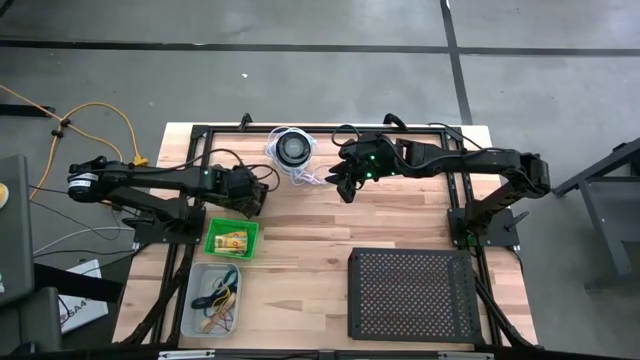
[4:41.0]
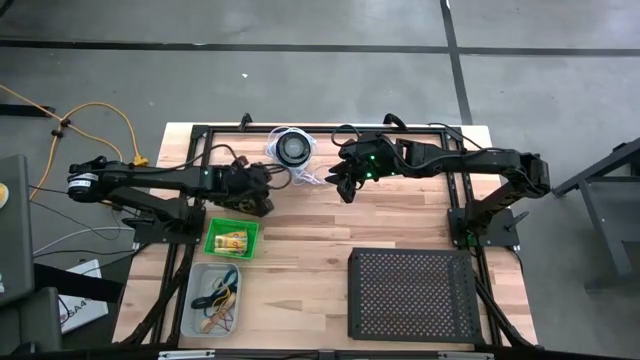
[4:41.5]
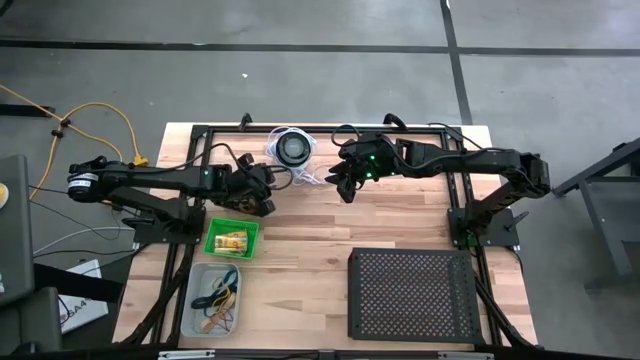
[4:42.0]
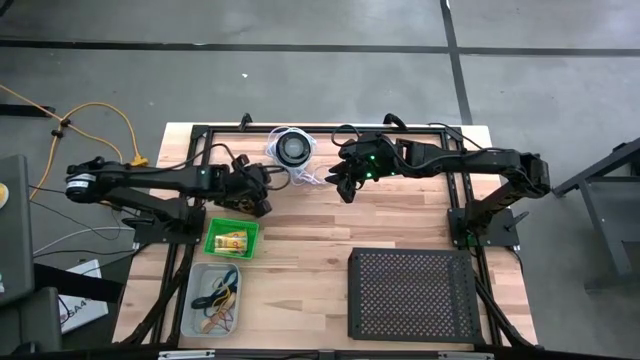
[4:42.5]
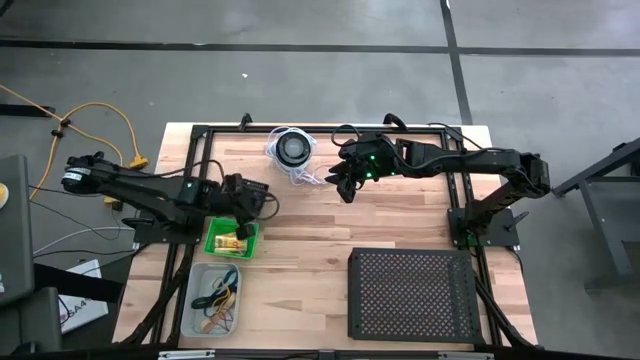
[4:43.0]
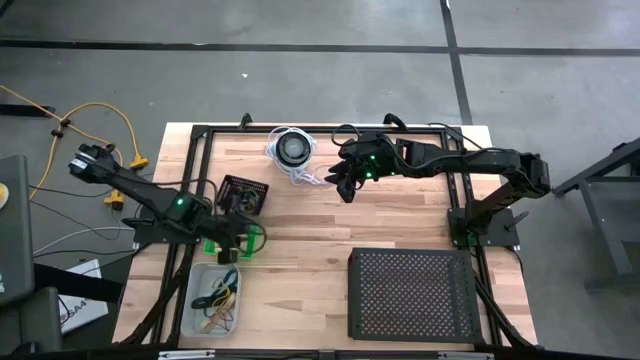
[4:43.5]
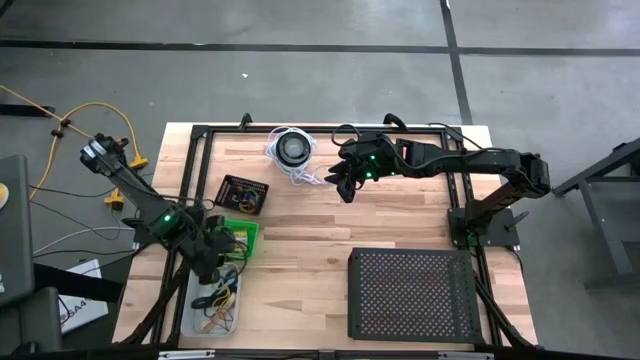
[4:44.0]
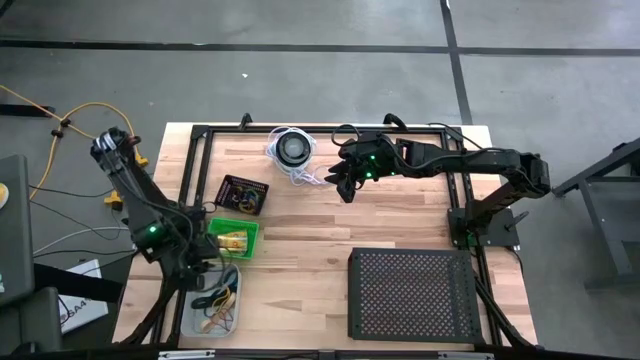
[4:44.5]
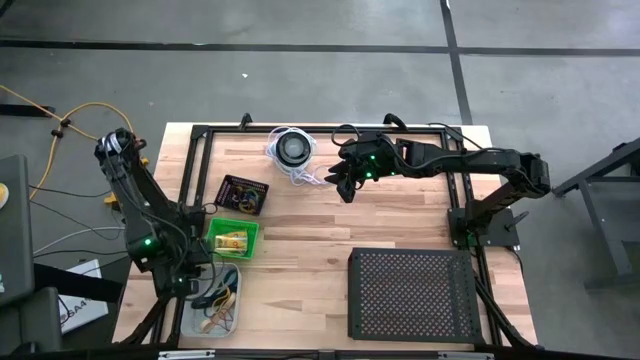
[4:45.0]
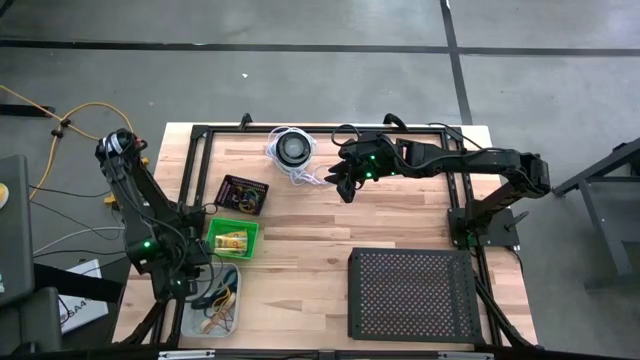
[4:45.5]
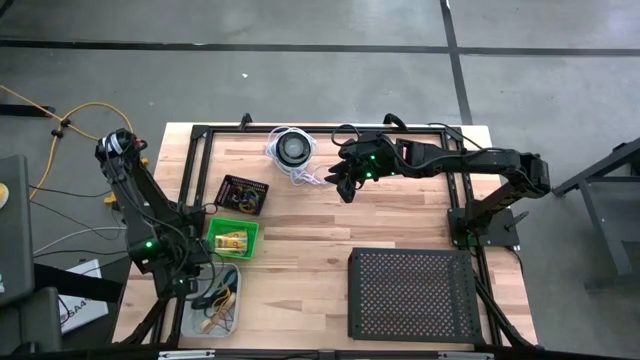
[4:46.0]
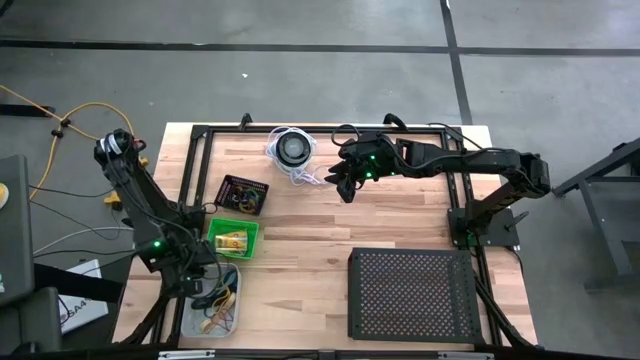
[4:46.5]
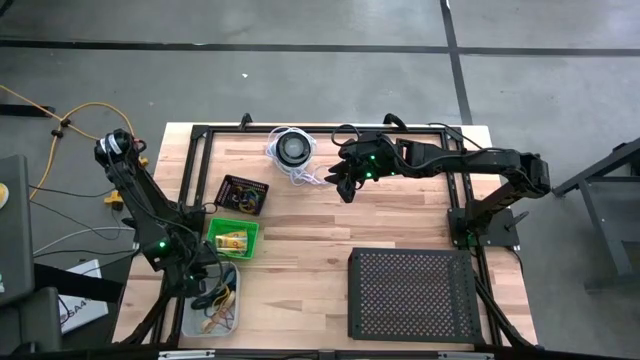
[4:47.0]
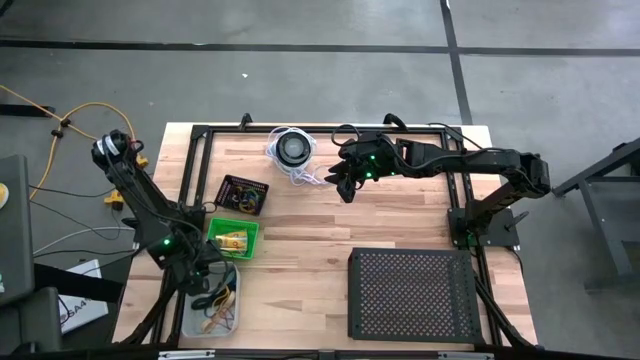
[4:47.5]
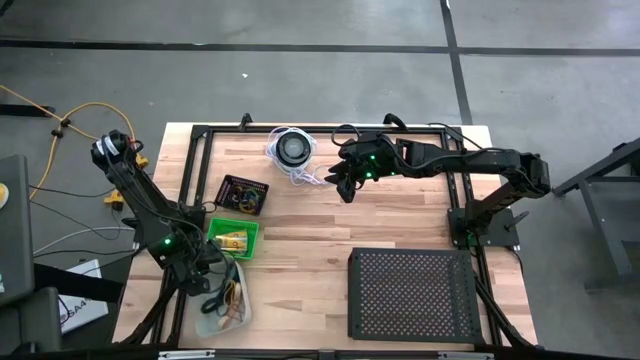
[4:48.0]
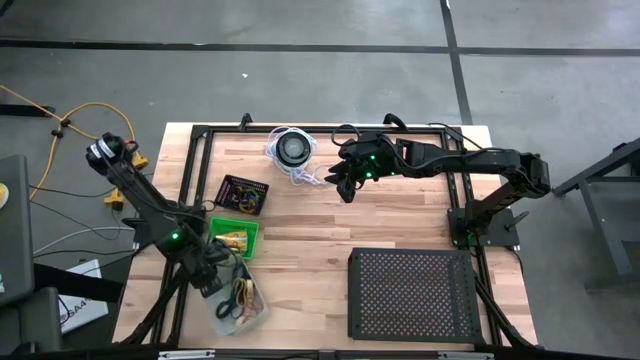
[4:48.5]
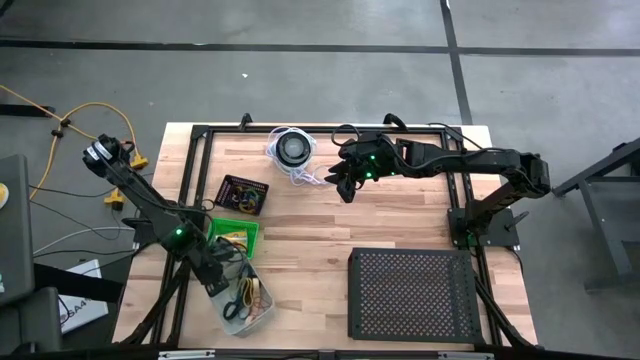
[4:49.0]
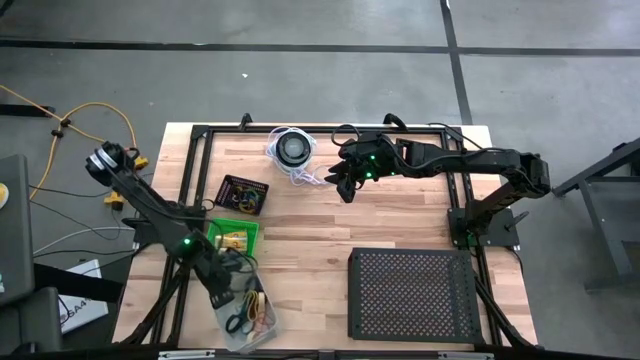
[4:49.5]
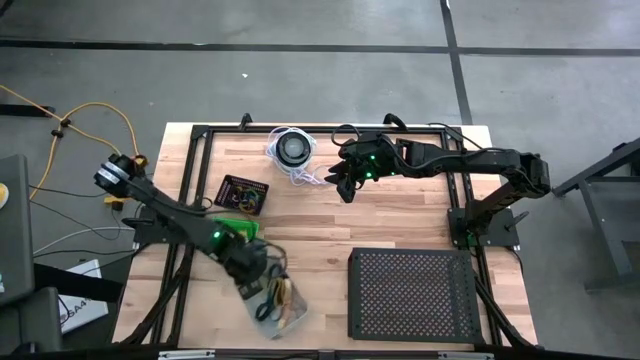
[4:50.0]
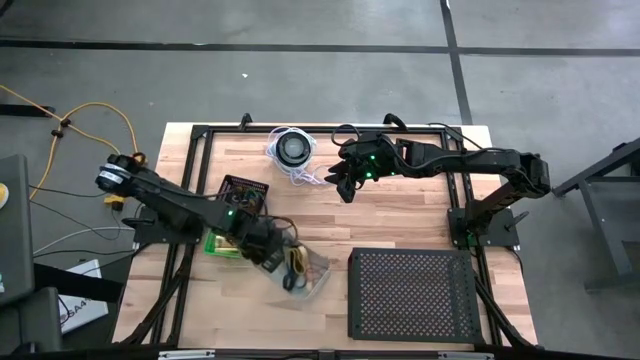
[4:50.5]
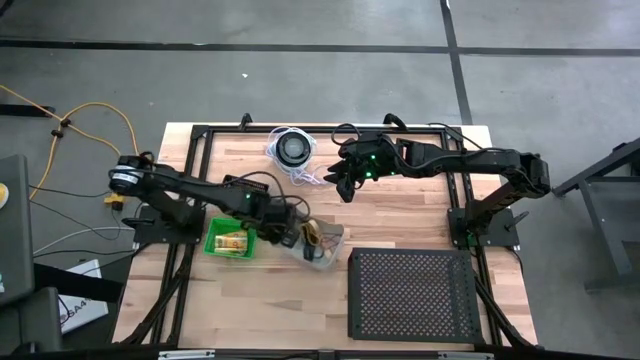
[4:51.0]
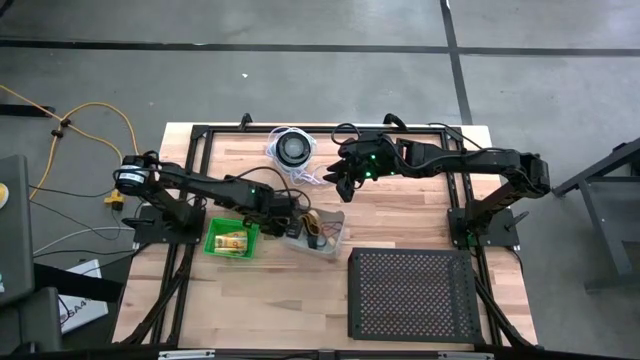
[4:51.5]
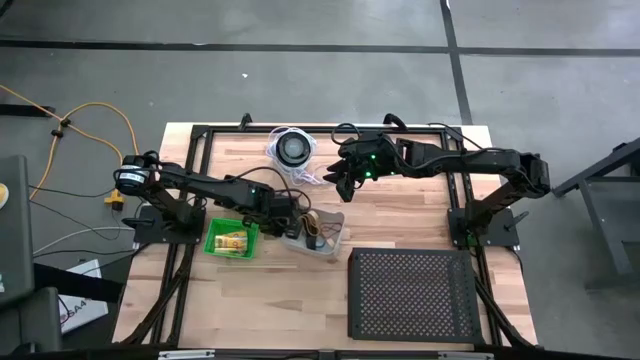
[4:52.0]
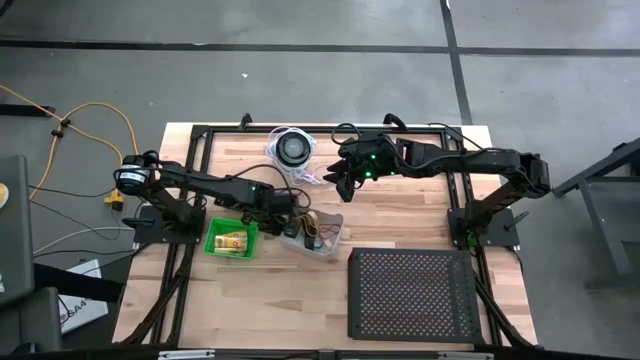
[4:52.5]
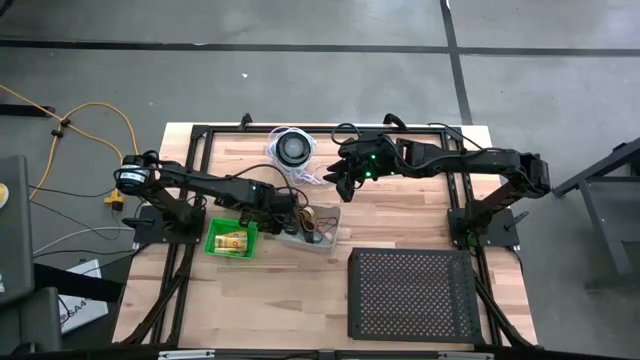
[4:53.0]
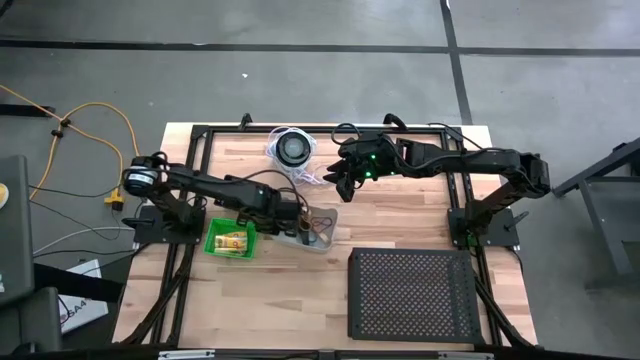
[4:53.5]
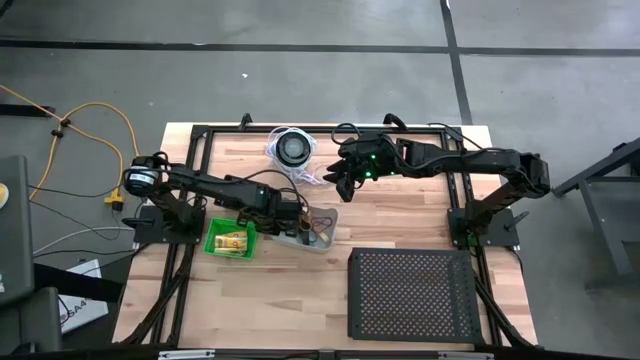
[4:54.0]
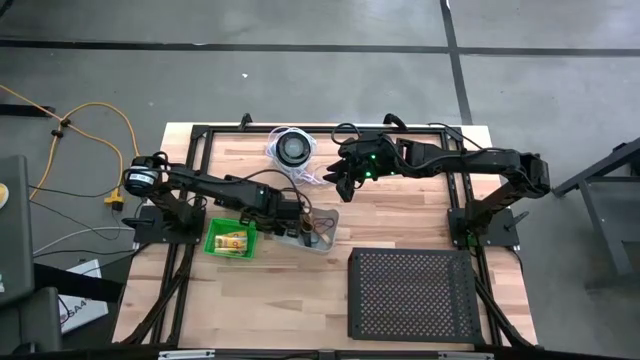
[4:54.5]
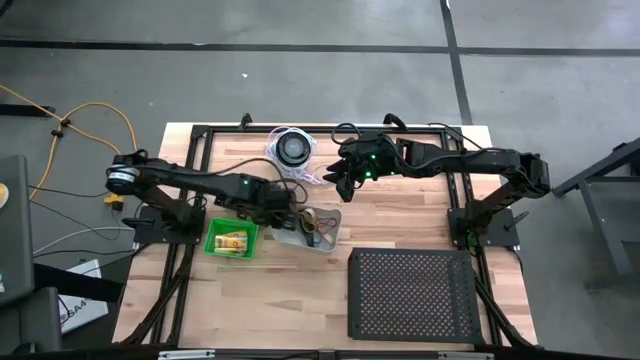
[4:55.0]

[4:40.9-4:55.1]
Task: Pick & Place Office Desk Supplies
Move the gray bin to the center of the table

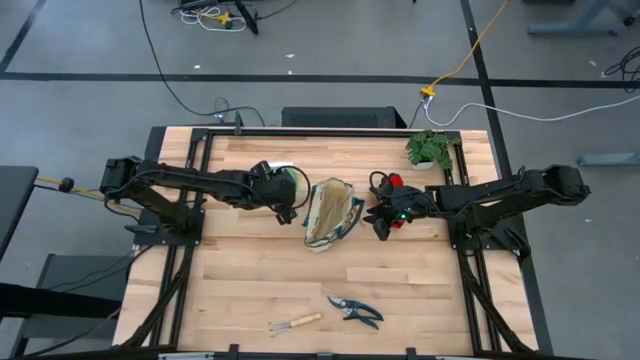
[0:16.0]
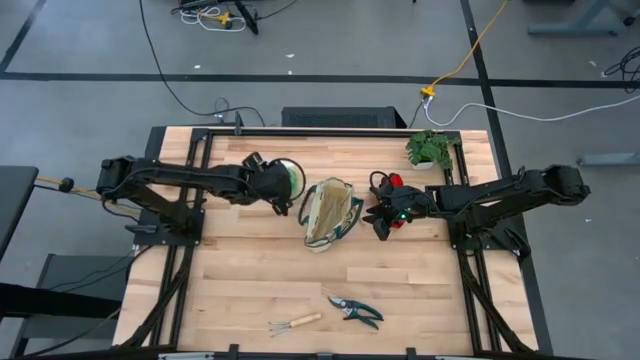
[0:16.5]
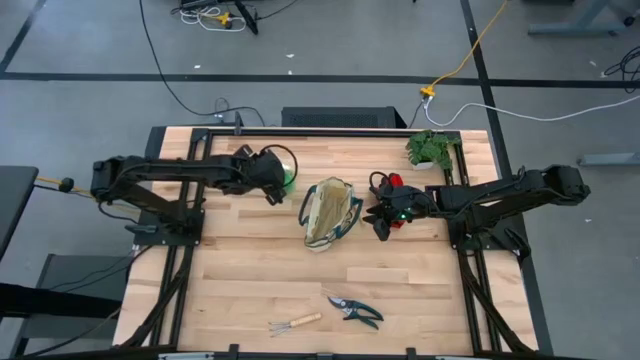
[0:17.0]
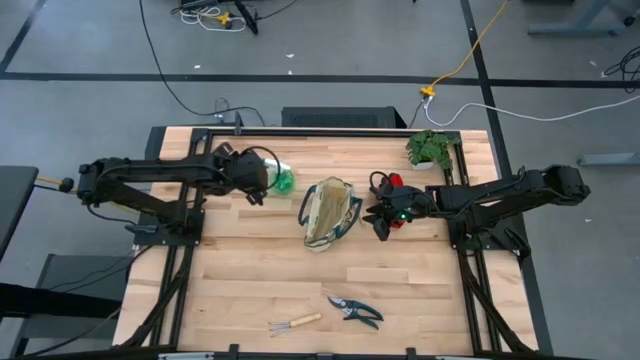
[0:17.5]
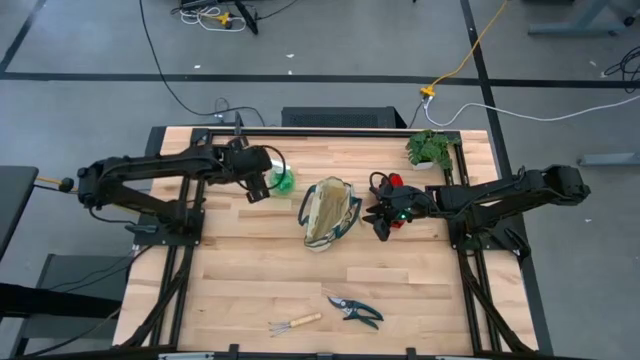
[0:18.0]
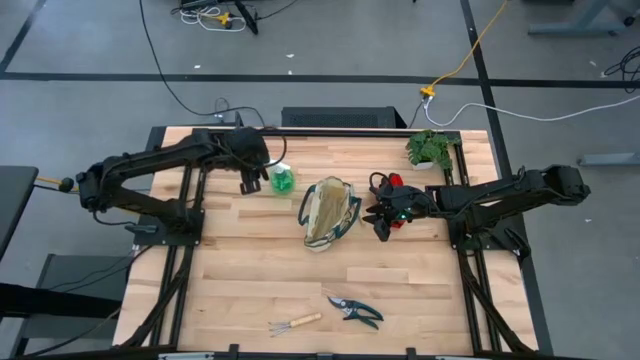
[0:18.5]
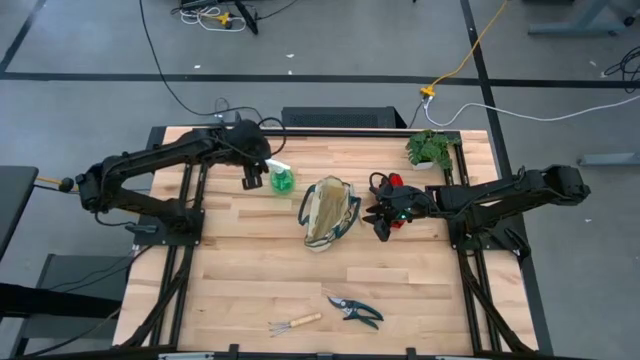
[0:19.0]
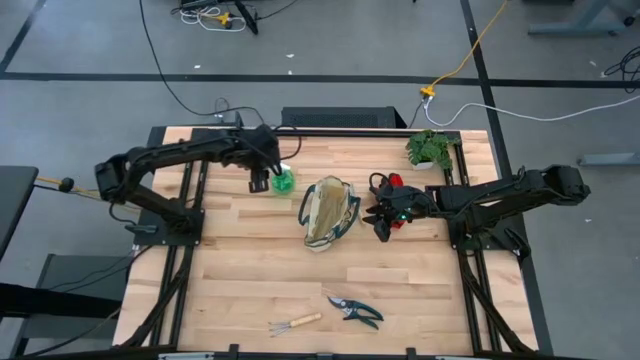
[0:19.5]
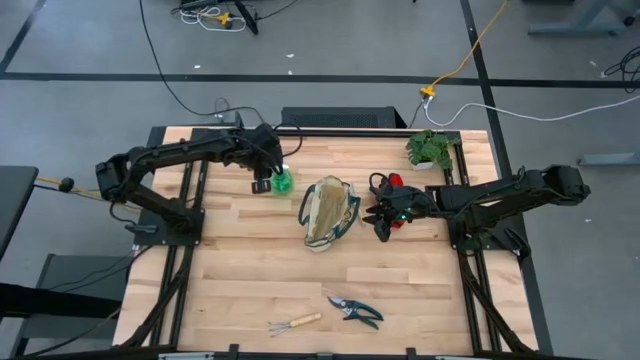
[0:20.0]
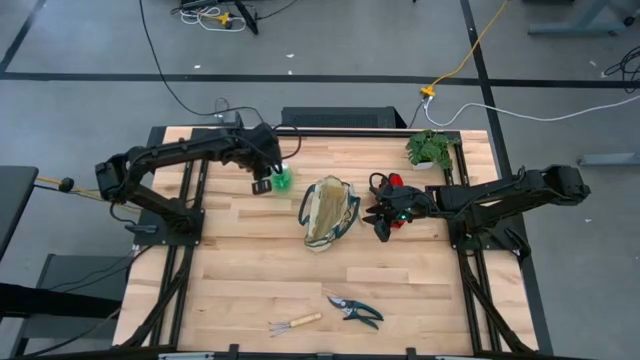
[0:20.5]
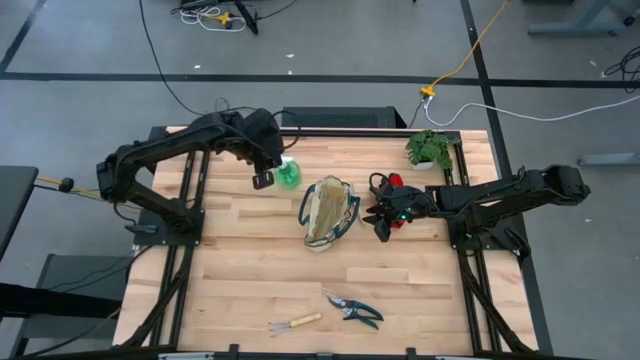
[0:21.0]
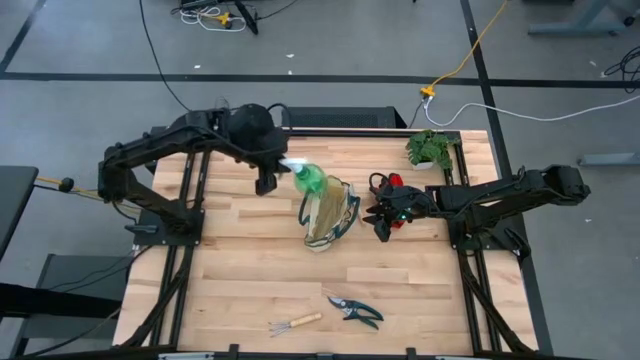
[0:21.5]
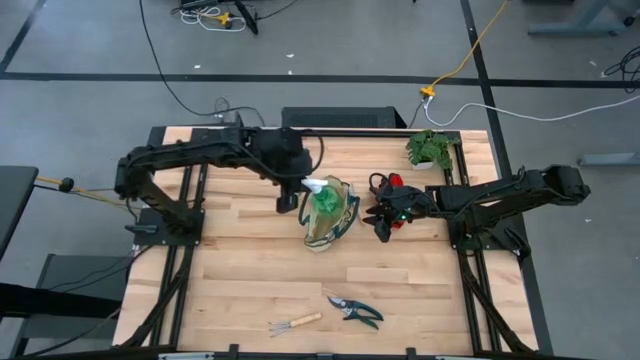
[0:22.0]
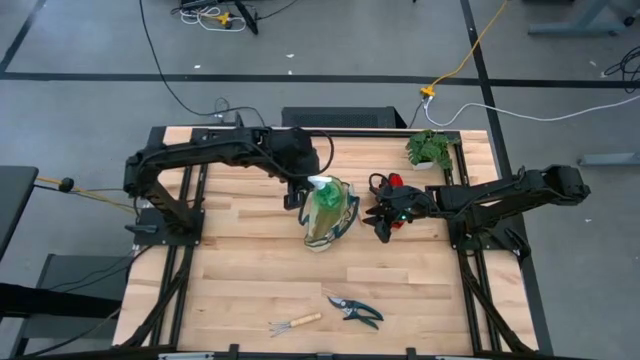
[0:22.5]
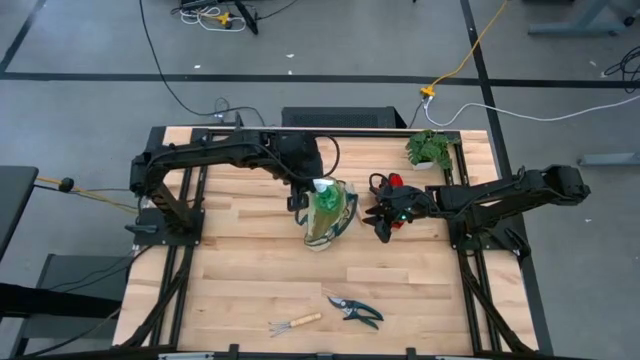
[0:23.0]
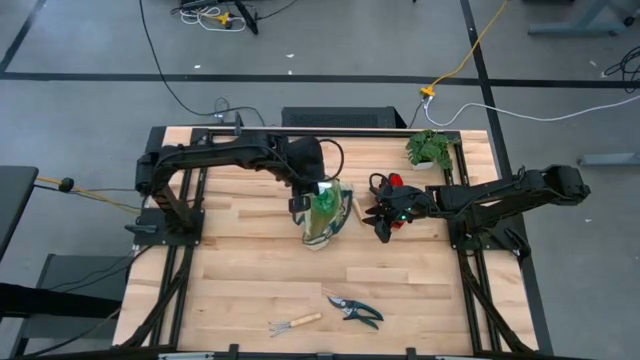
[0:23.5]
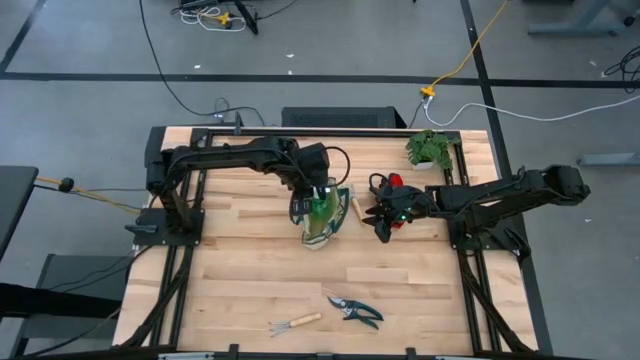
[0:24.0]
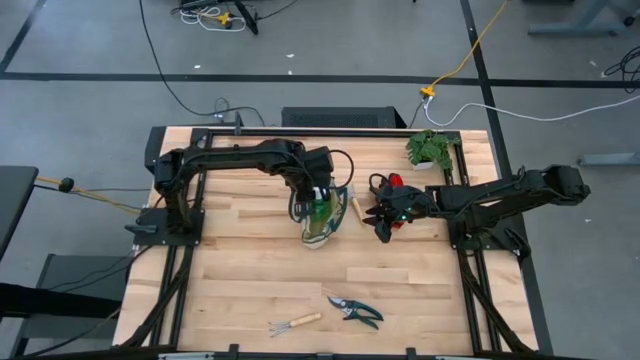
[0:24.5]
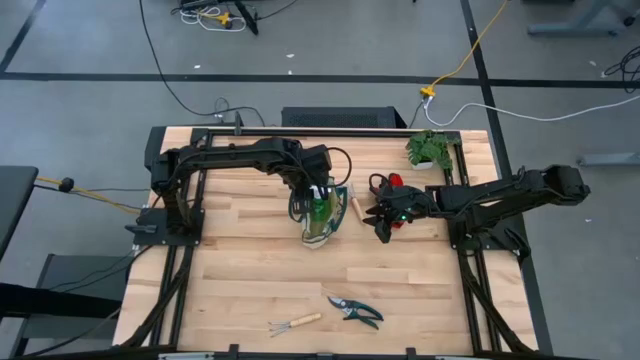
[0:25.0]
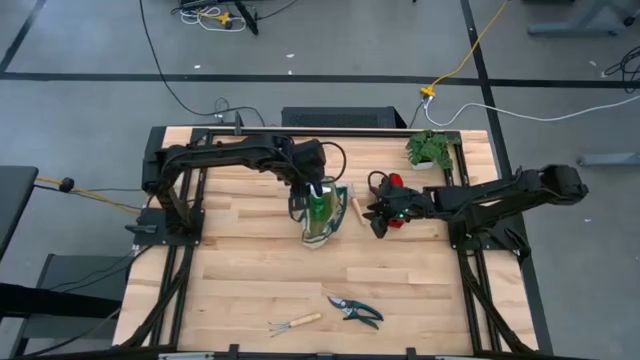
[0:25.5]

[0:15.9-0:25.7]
Task: Pick & Place Garden tools in Gardening bag
Put the green spray bottle into the brown gardening bag
